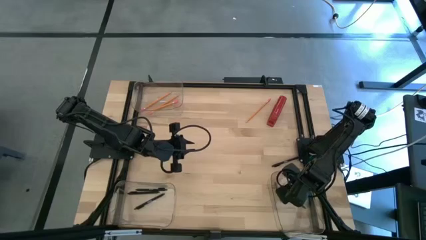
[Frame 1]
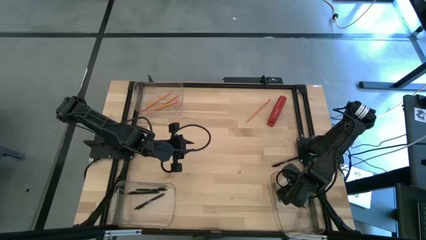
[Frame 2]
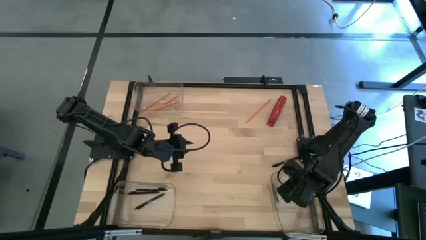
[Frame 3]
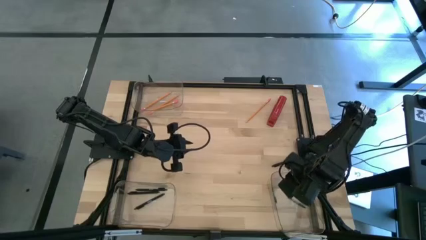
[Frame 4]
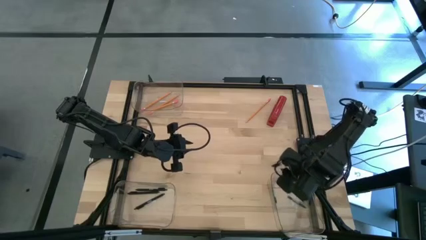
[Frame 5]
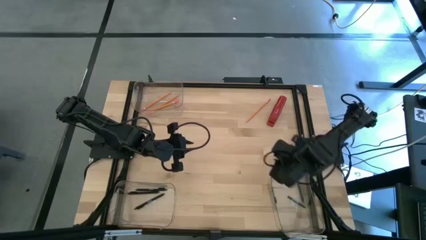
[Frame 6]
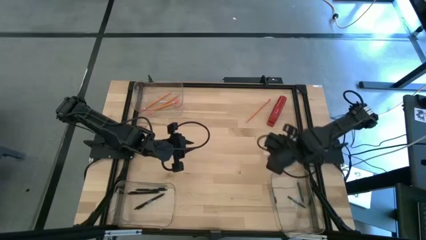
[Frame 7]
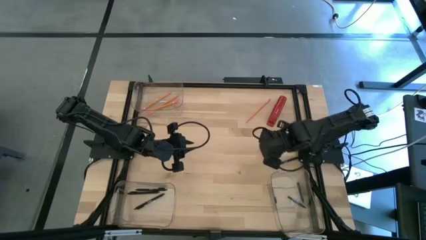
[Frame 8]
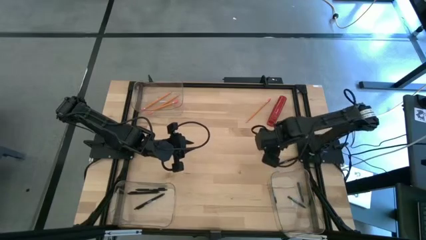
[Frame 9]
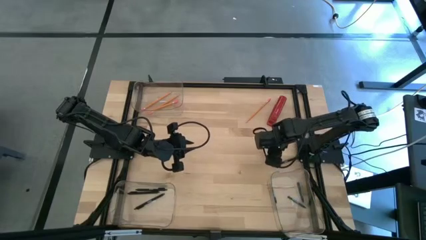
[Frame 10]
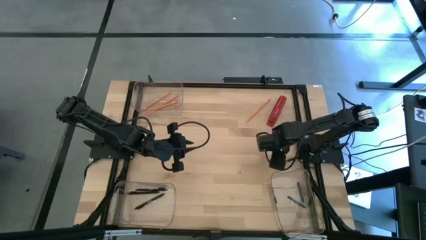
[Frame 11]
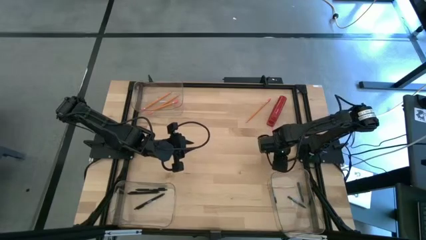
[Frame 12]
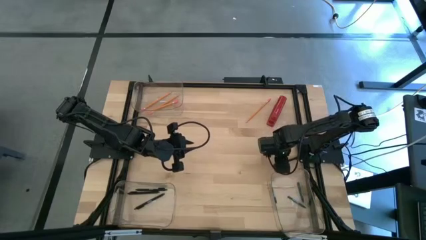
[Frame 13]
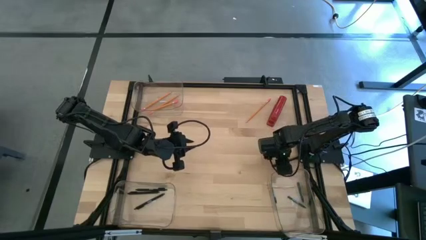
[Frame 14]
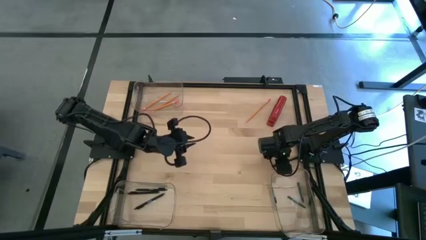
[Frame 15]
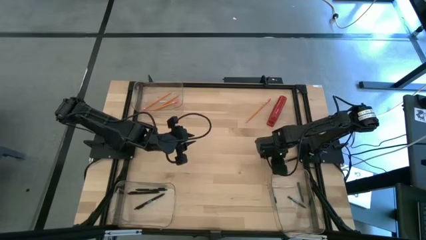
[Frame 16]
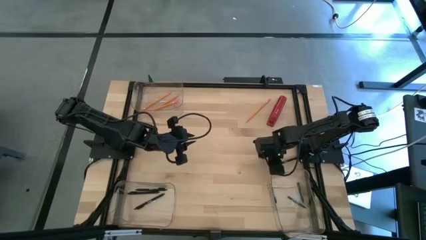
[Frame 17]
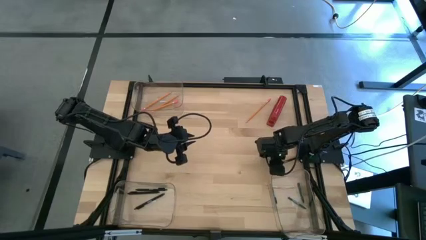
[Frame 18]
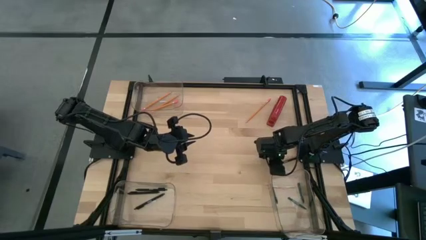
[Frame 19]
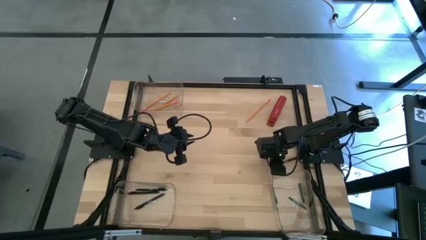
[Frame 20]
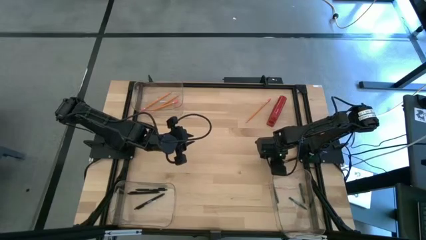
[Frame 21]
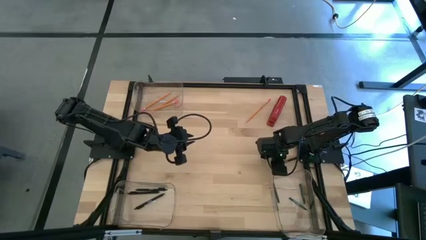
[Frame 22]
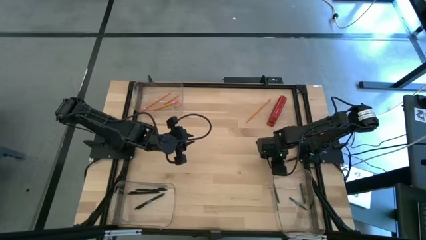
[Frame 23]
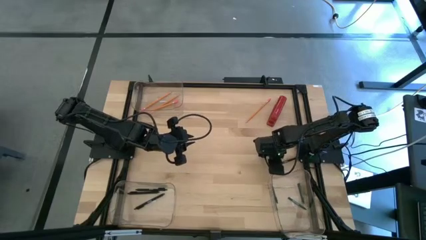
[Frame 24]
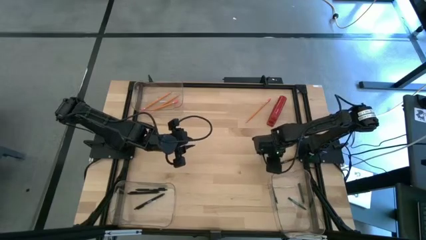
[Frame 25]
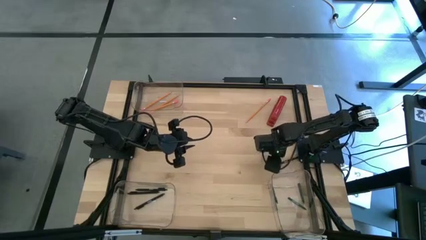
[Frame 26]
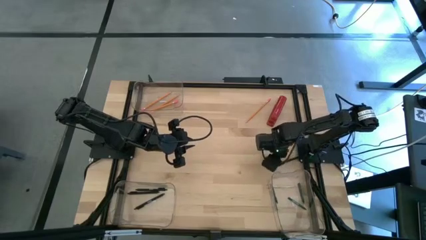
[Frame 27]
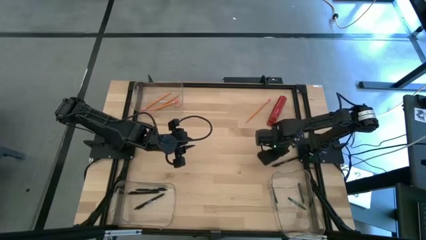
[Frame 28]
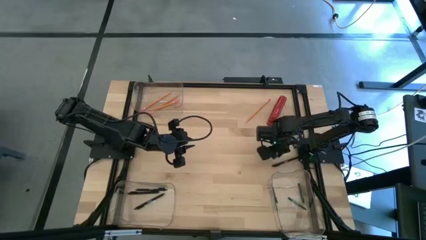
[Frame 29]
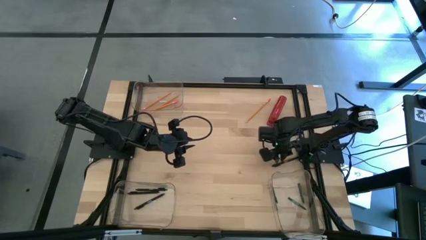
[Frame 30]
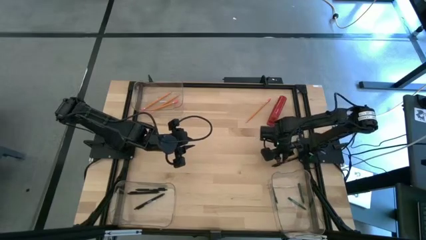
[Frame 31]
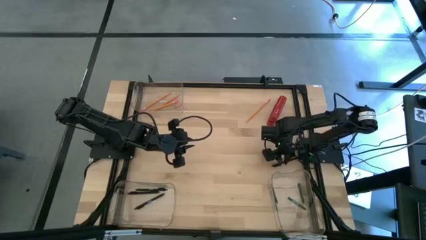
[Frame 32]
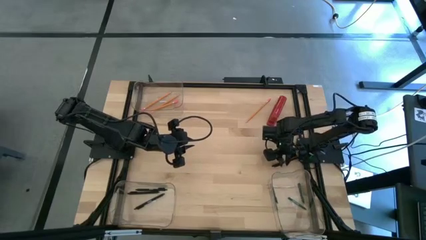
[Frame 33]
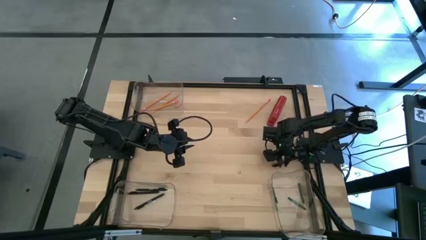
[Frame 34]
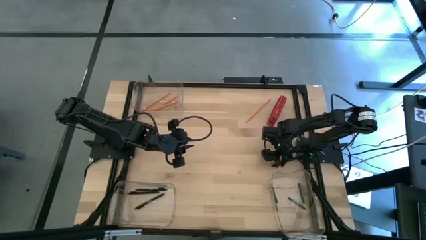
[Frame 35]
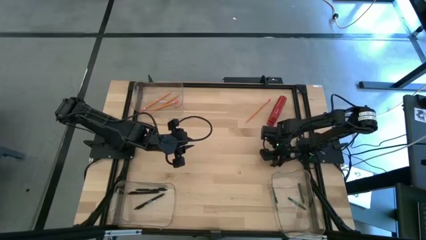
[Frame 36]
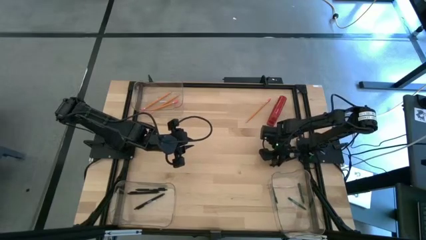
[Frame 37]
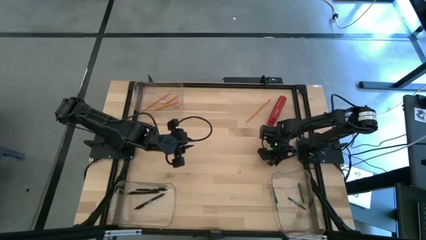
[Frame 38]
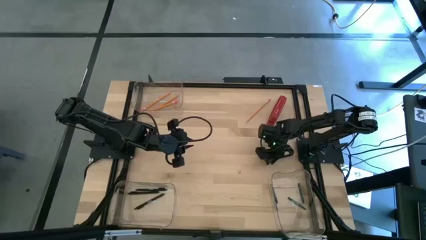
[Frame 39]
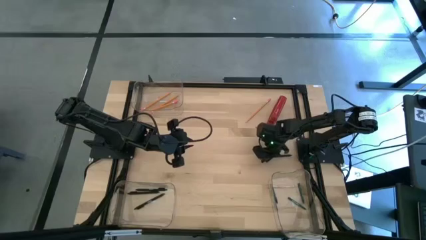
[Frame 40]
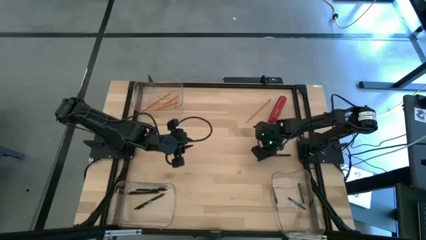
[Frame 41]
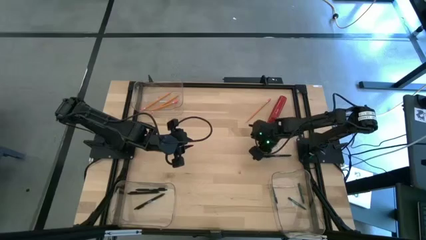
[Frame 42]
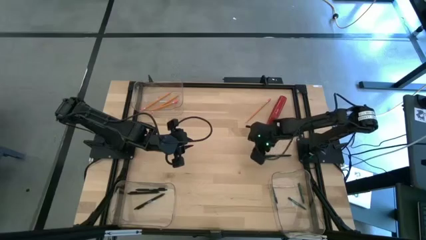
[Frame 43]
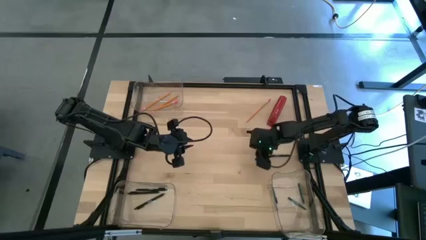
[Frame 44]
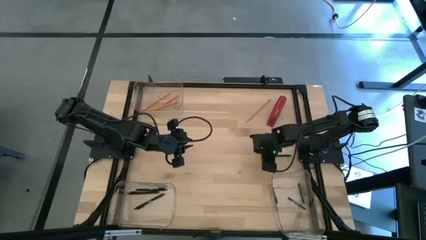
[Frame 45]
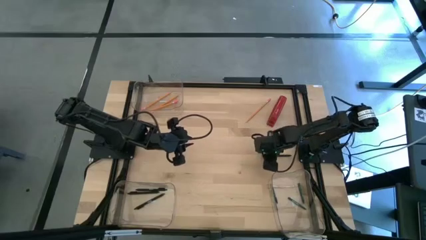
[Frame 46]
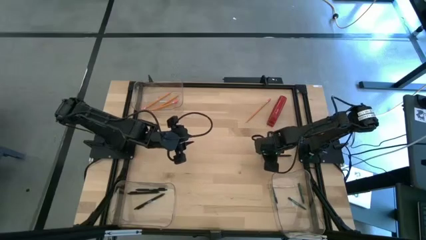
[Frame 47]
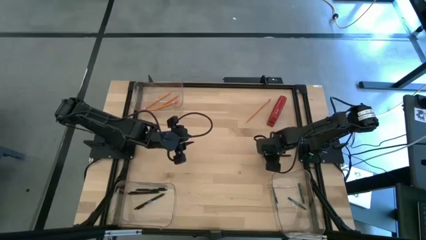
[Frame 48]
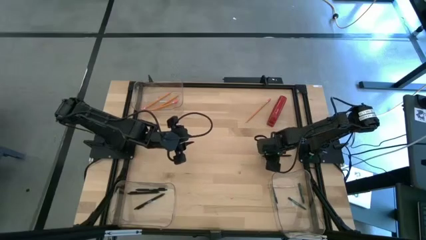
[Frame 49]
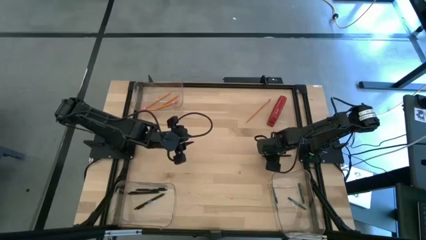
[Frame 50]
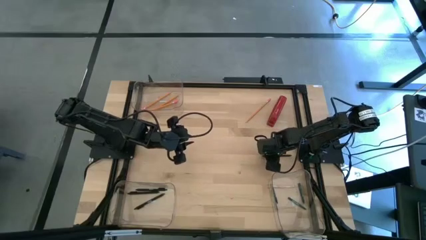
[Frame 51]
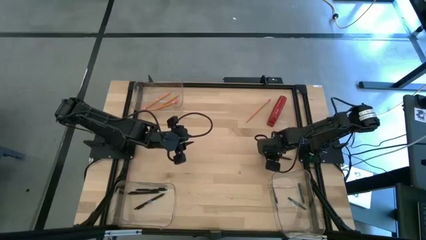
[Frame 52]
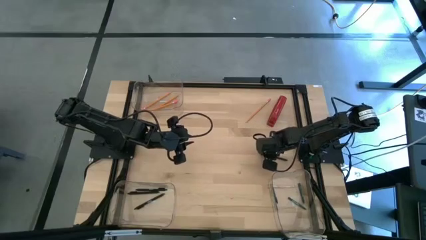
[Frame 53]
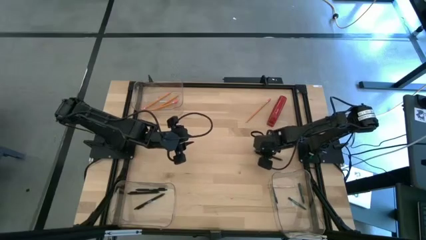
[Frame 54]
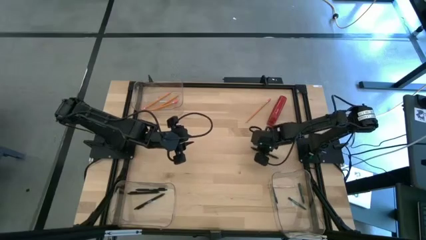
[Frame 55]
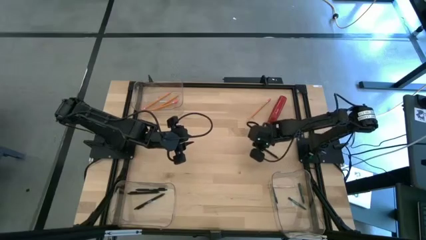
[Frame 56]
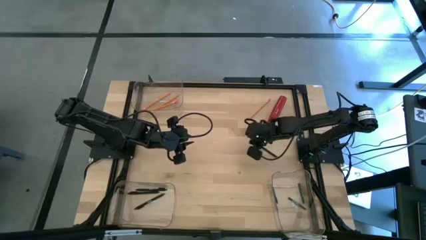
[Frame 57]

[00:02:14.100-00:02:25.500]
Task: Sort crayons/erasers/pens/pencils in bins
Put the black pen into the bottom left transparent bin

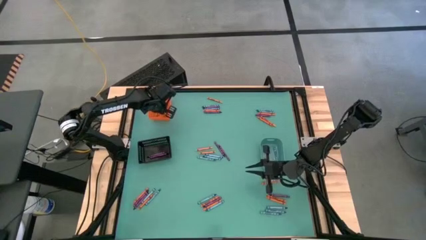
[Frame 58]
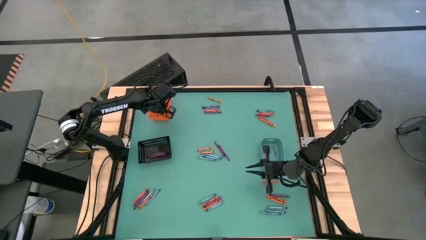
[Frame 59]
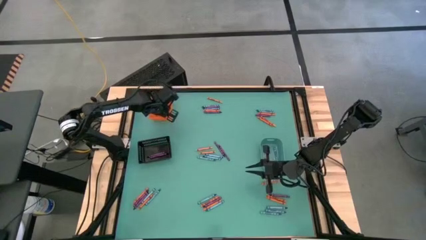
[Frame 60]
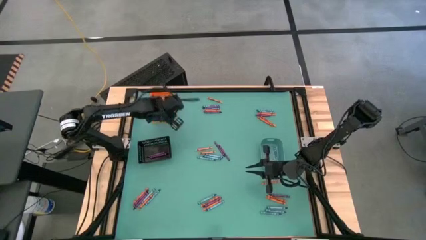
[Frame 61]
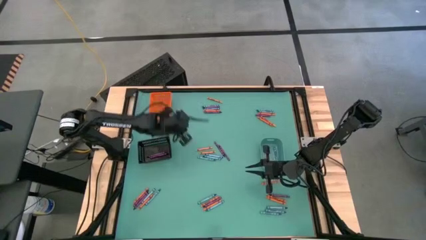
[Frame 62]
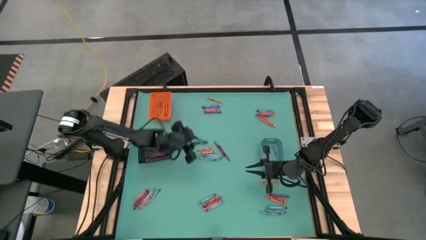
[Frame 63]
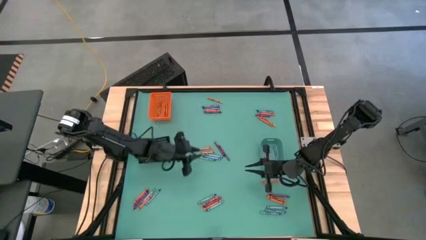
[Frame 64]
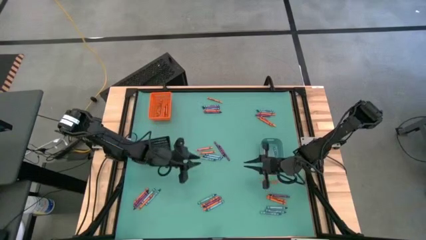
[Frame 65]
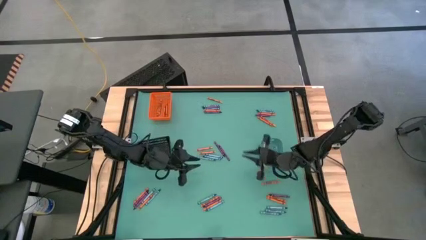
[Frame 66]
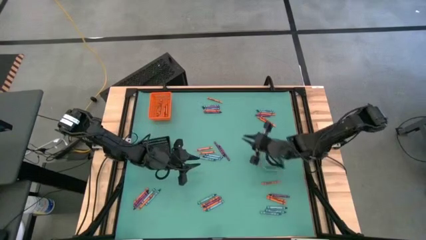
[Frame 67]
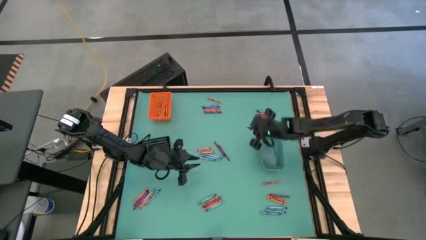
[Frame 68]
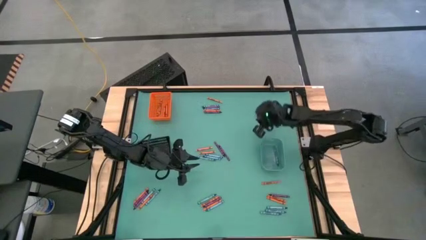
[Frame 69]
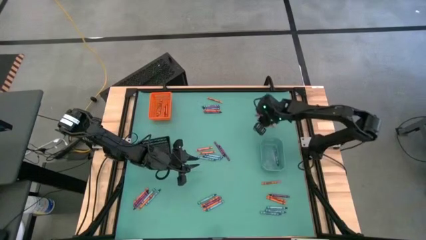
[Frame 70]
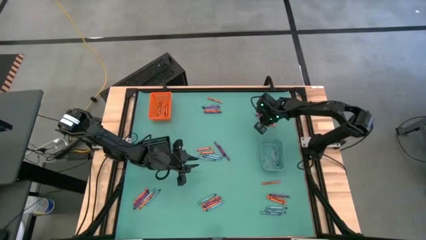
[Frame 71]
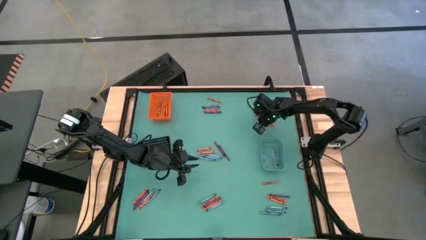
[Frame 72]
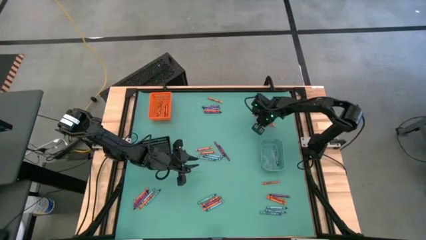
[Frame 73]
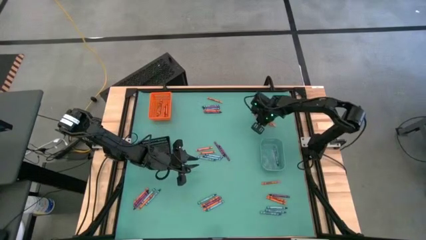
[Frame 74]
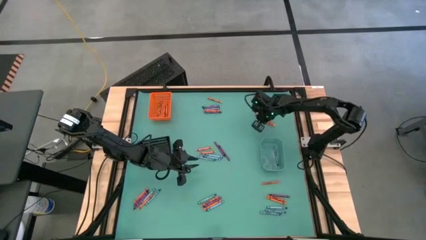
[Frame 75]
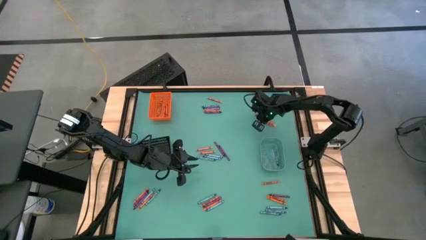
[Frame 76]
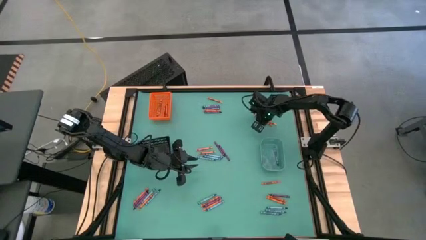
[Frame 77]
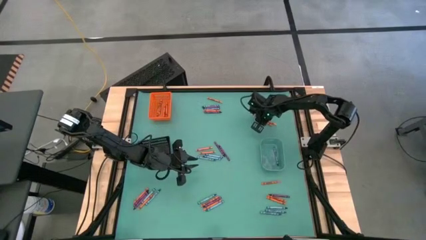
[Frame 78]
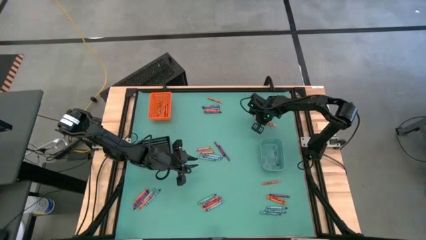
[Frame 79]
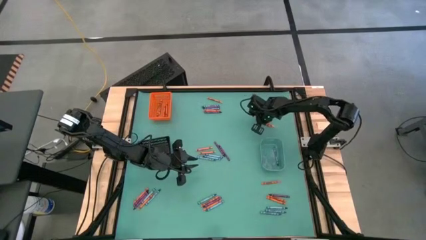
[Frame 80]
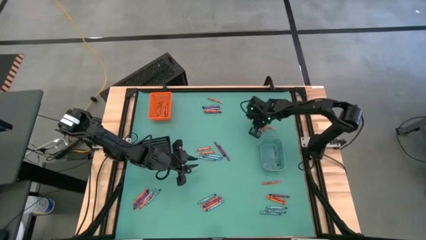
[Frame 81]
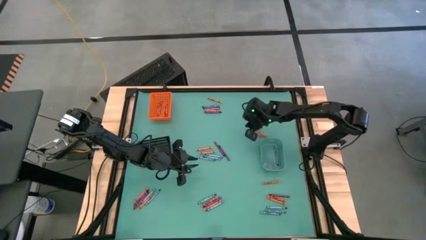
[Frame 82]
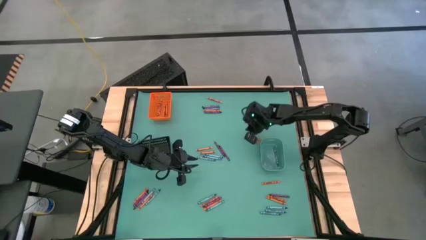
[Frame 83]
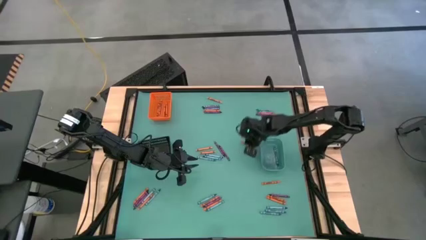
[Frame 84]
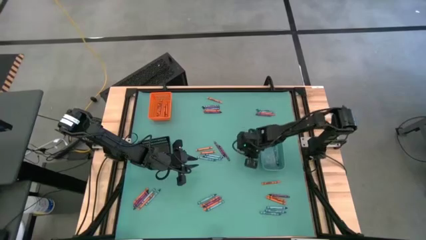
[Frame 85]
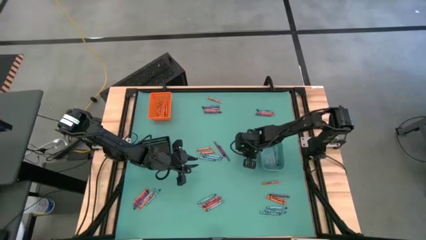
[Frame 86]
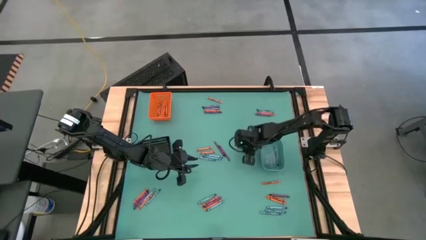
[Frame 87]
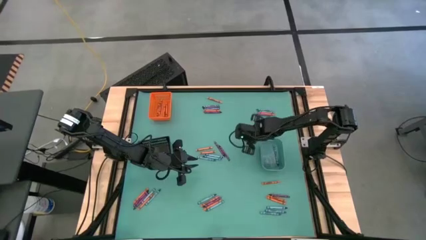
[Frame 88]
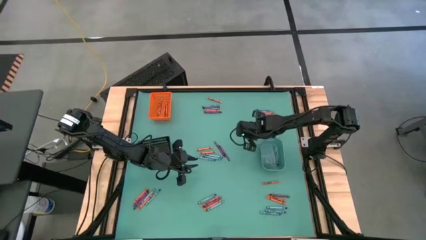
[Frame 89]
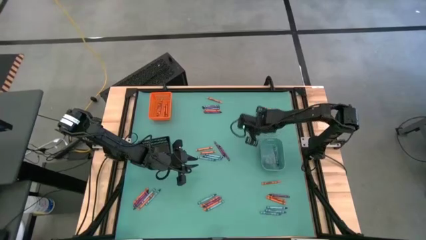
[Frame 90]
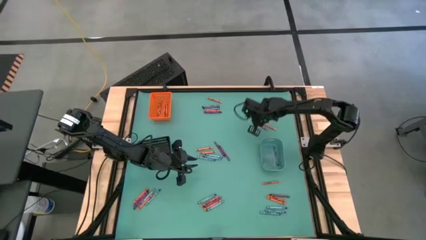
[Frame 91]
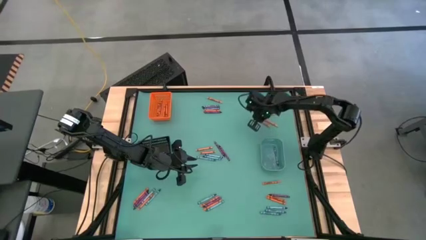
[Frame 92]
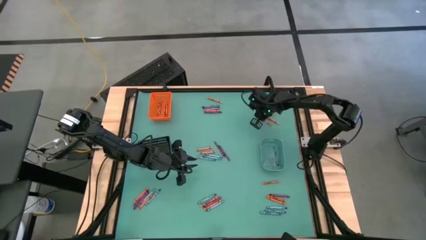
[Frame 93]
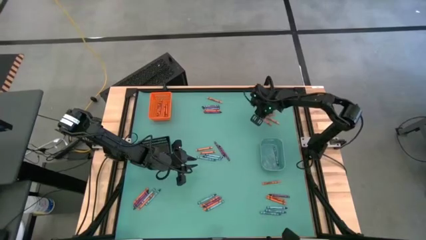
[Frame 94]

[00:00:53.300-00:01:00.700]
Task: Sort crayons
Put the orange crayon into the orange bin
